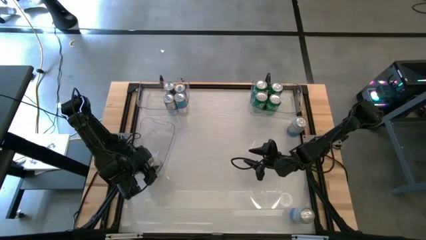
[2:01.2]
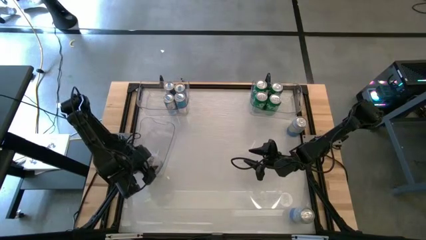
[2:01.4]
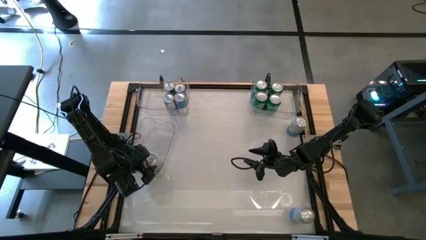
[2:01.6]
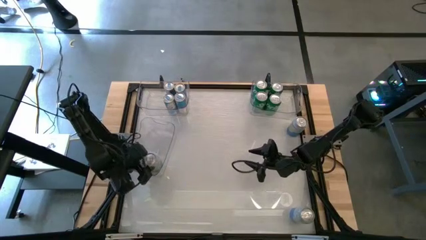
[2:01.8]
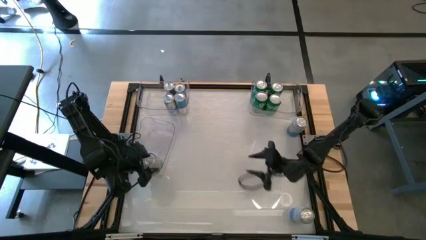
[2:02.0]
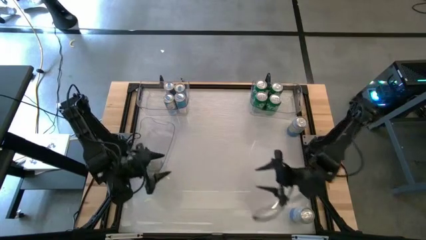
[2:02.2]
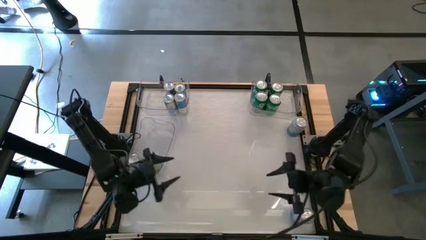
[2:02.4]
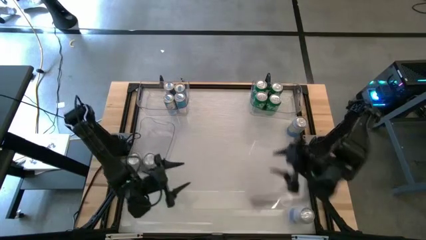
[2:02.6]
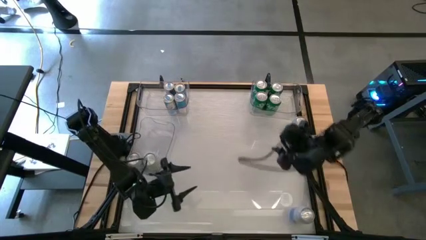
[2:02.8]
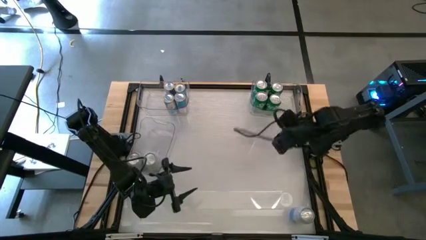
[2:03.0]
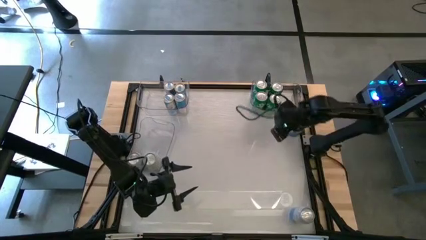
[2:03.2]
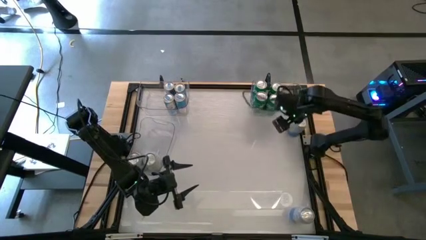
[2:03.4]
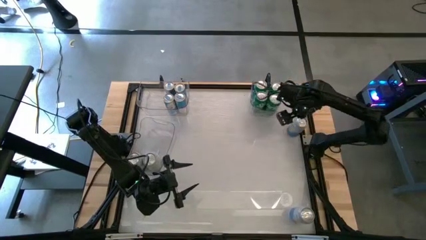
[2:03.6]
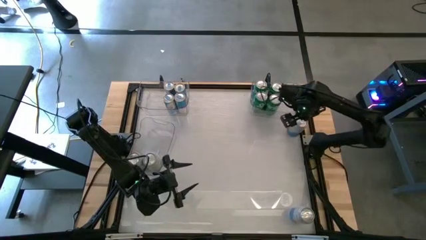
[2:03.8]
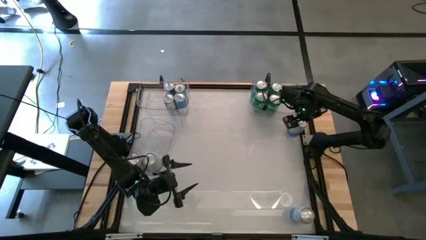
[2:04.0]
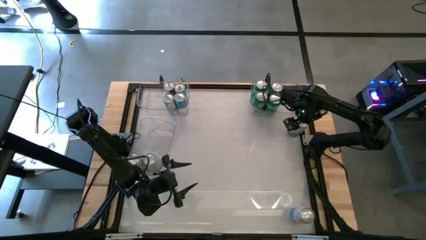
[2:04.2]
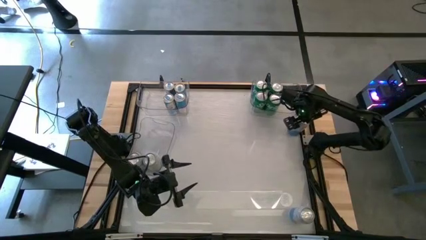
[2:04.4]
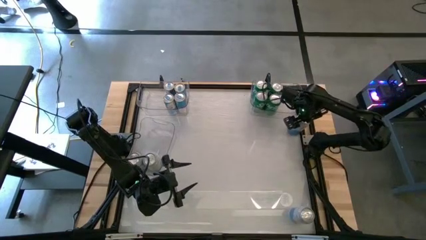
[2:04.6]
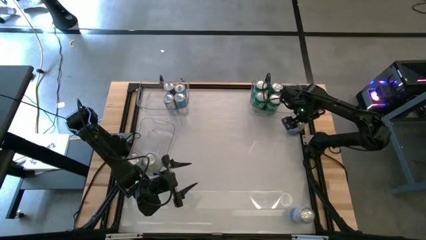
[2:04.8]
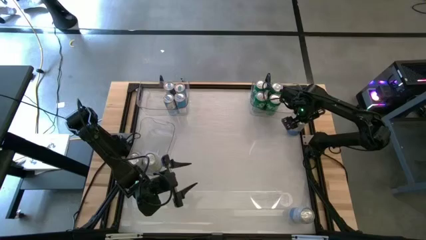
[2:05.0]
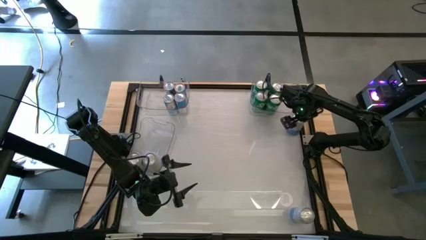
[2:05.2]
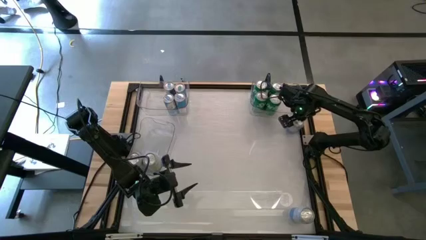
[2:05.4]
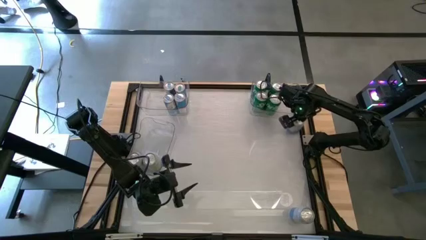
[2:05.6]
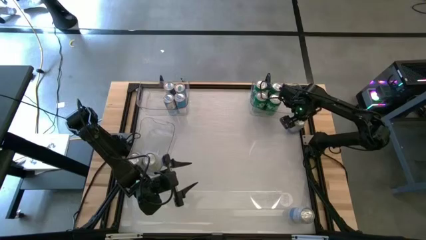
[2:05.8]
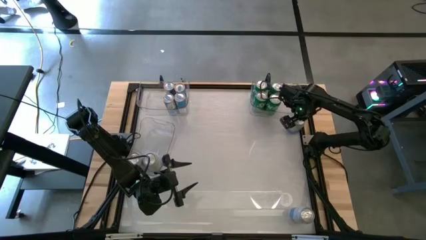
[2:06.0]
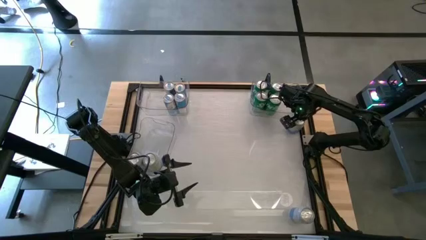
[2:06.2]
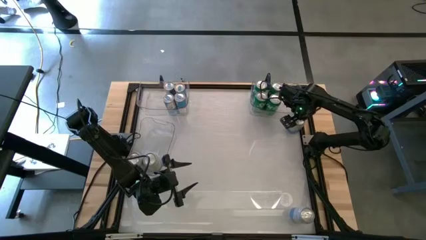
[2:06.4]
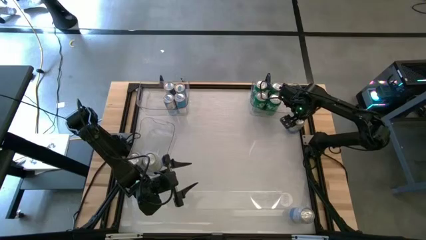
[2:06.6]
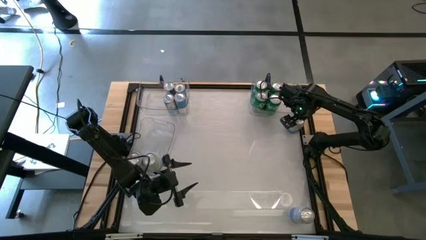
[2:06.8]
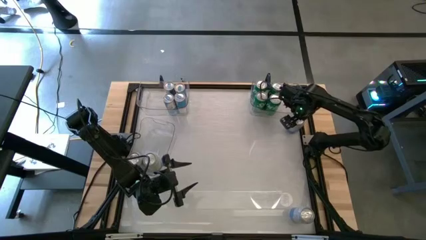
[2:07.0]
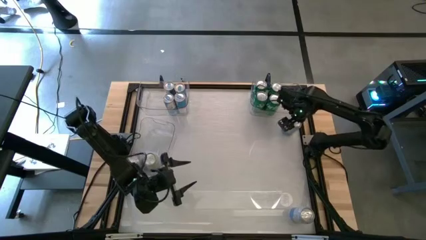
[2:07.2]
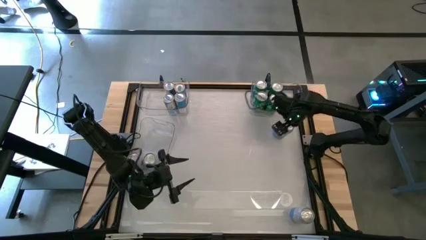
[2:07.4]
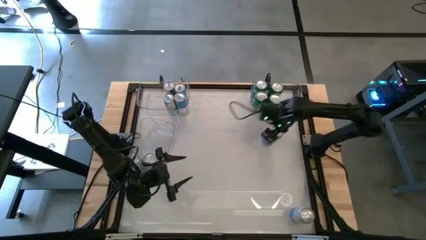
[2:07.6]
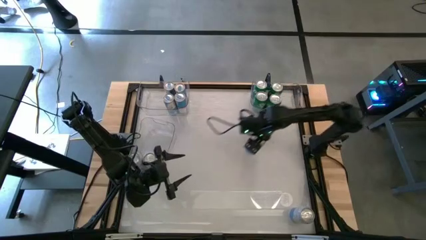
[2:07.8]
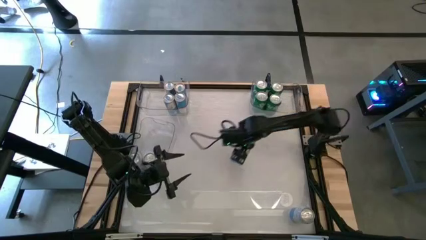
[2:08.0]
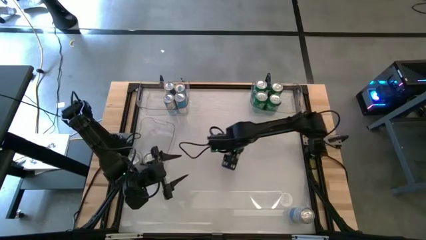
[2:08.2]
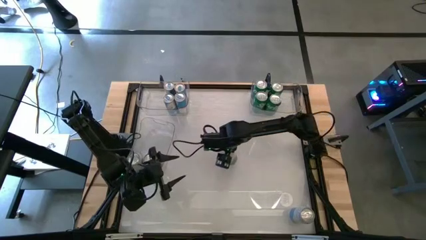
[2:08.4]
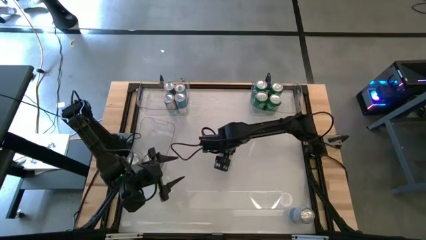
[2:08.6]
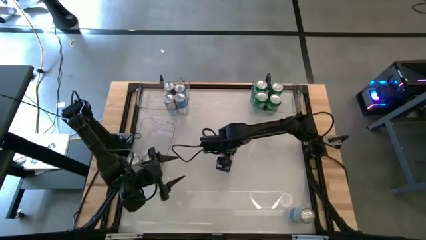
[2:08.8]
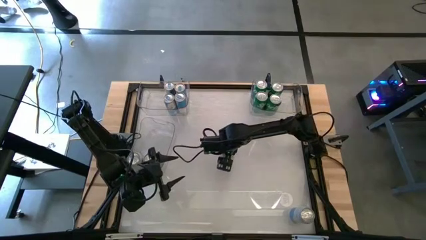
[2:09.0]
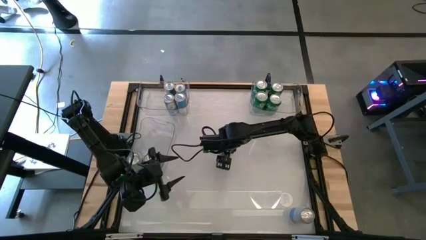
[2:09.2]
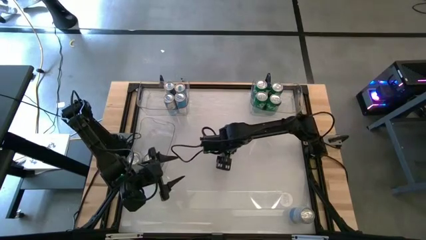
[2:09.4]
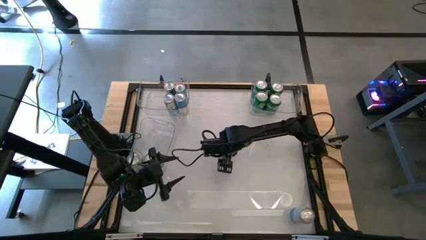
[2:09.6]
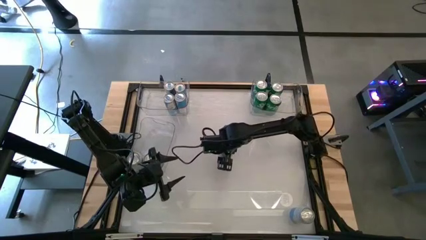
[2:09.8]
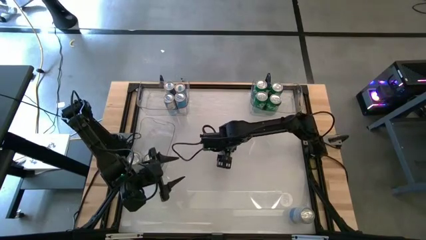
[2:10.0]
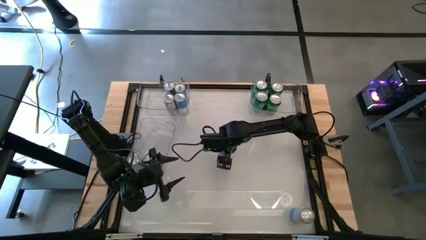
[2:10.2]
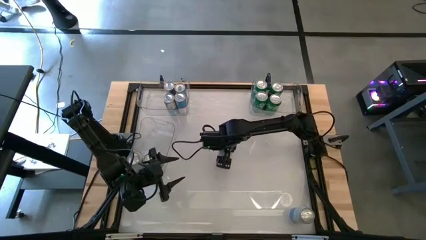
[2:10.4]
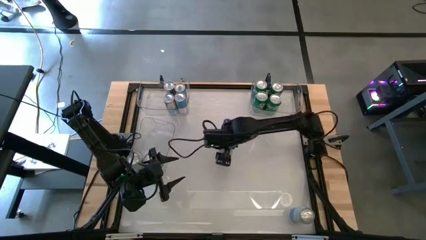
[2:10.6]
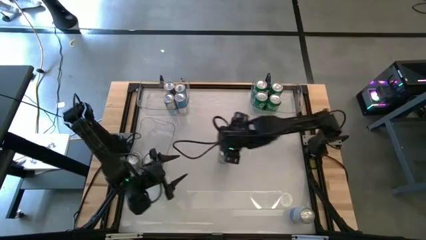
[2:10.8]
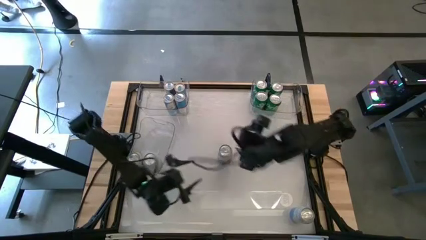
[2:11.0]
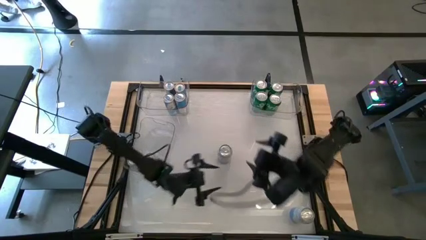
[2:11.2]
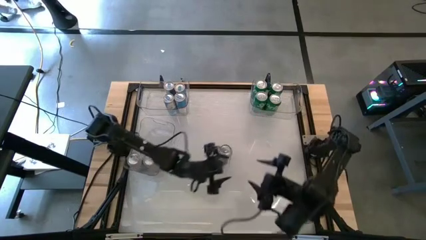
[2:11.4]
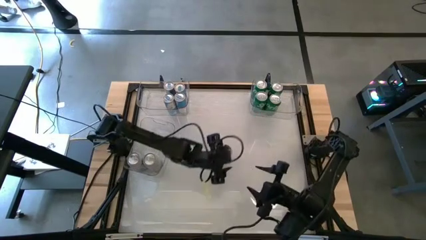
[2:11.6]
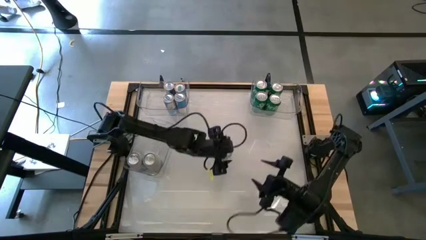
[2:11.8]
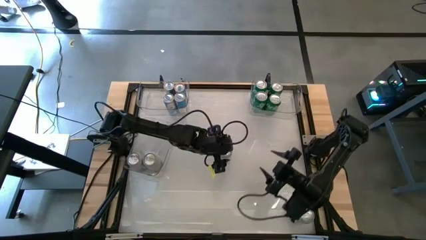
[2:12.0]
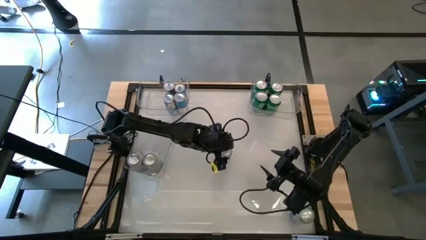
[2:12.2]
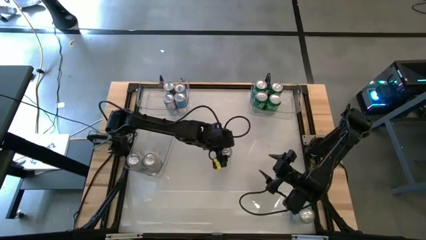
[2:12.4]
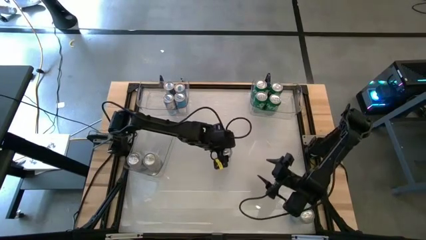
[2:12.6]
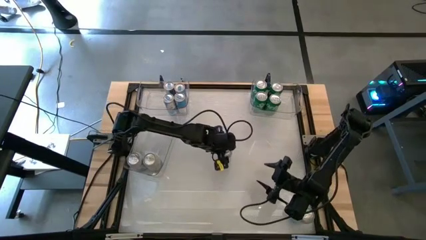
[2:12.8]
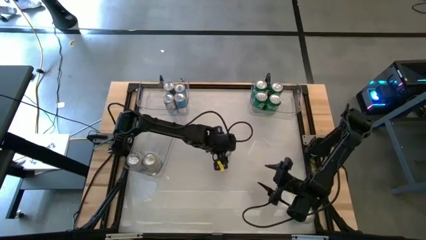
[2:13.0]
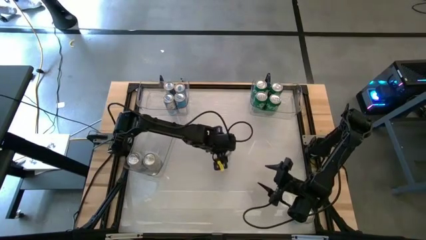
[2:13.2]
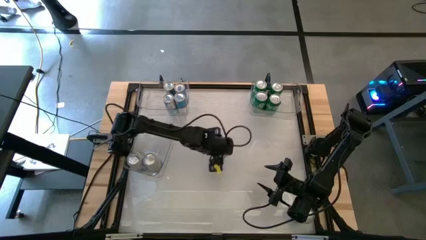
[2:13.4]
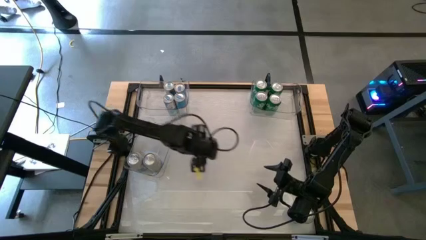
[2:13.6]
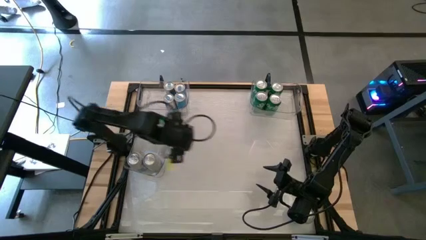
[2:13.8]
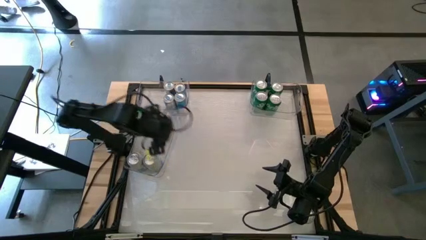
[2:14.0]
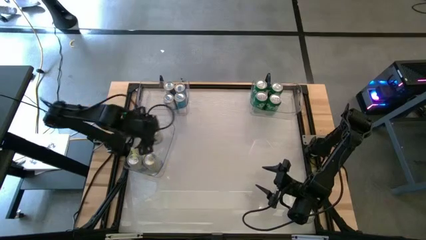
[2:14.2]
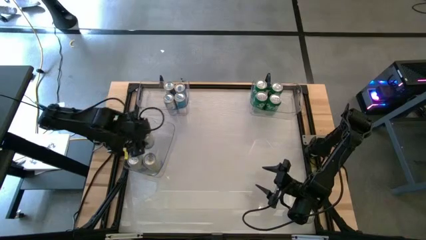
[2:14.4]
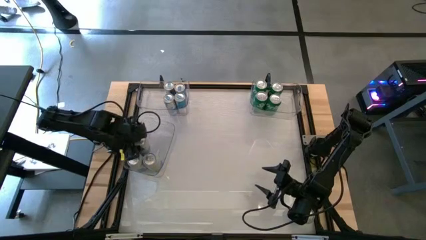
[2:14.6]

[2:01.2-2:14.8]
Task: Sort soda cans
Put the top blue-white soda can into the middle left transparent bin

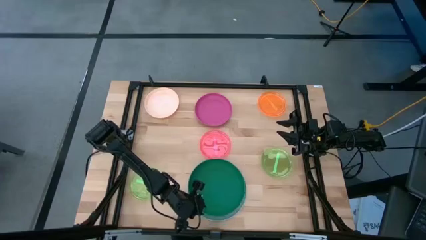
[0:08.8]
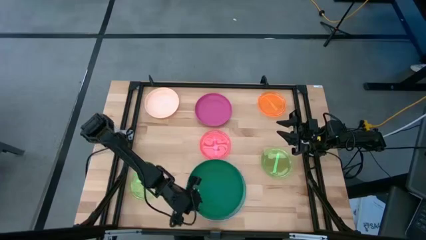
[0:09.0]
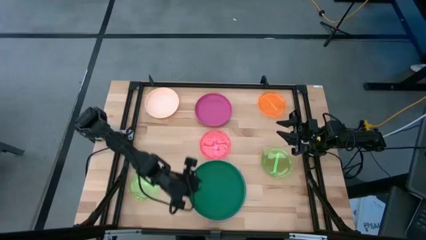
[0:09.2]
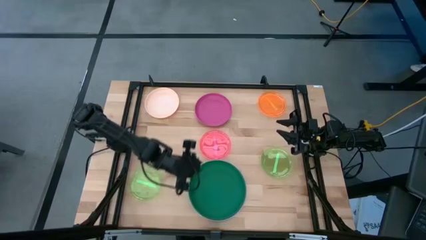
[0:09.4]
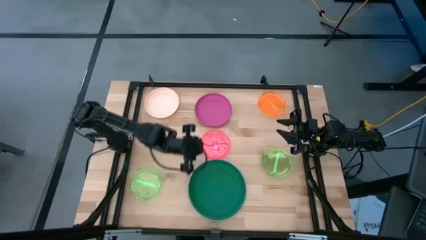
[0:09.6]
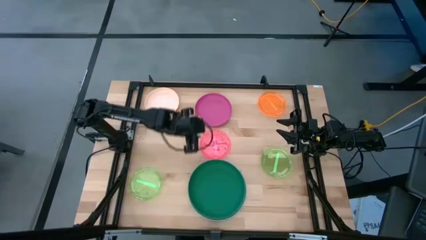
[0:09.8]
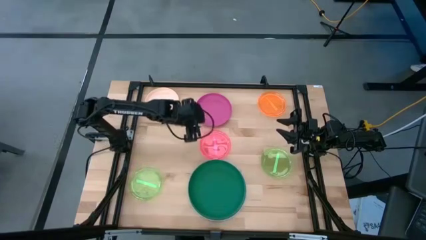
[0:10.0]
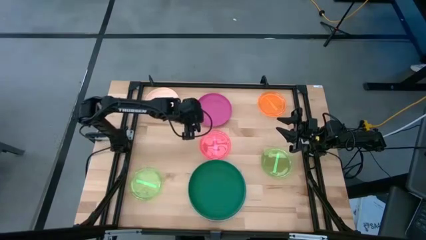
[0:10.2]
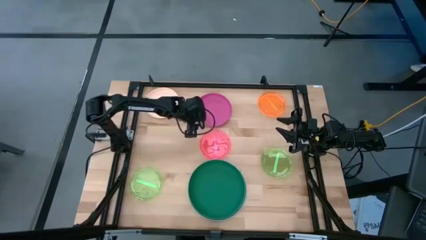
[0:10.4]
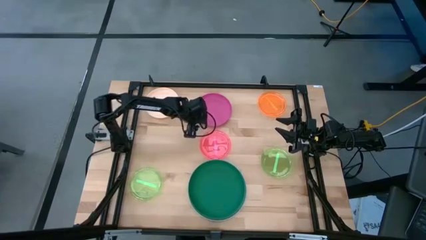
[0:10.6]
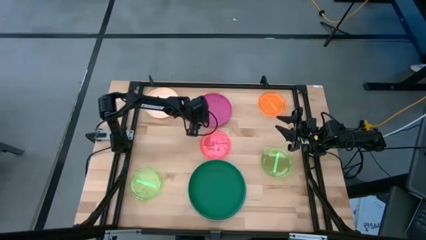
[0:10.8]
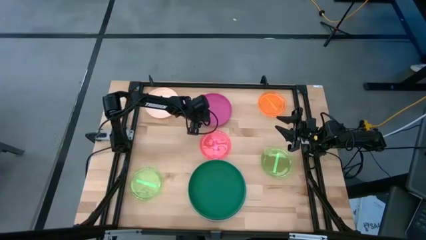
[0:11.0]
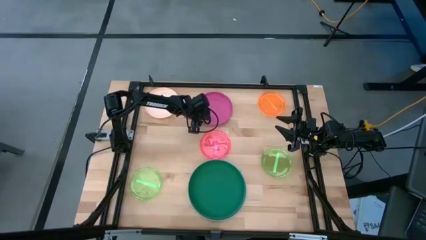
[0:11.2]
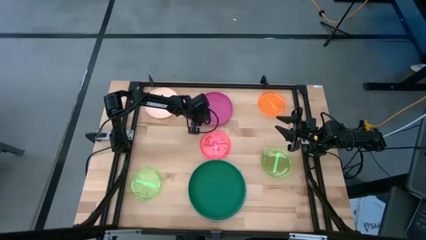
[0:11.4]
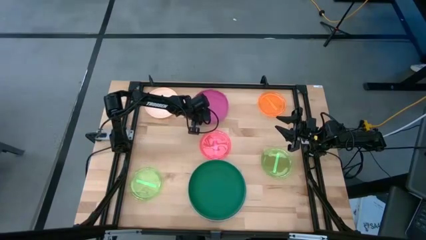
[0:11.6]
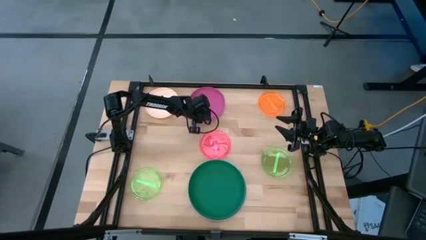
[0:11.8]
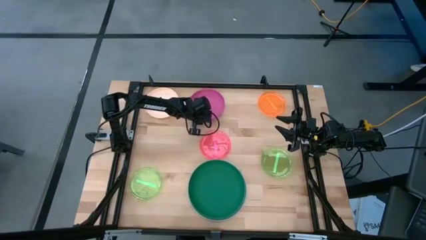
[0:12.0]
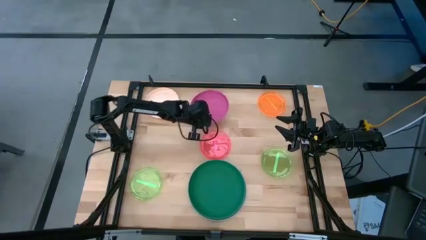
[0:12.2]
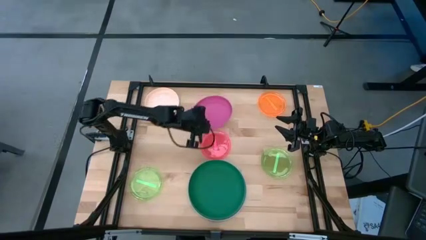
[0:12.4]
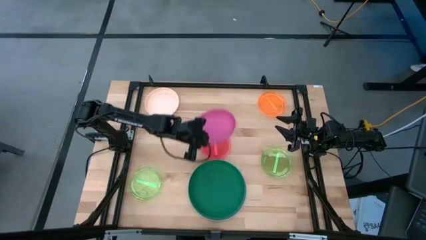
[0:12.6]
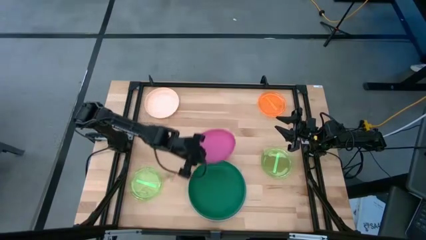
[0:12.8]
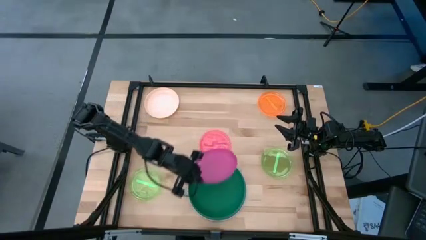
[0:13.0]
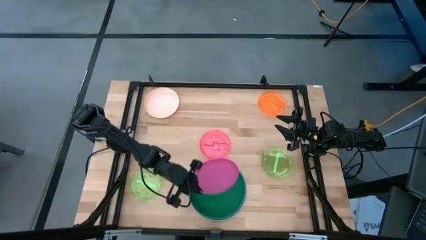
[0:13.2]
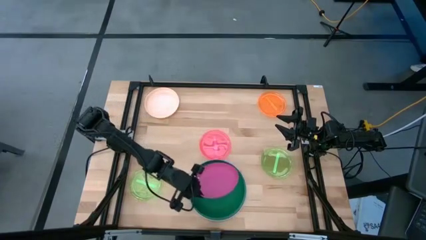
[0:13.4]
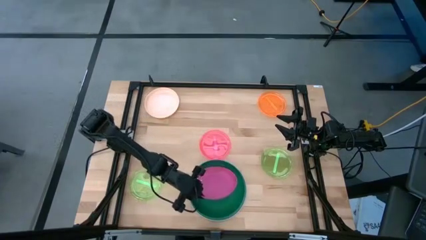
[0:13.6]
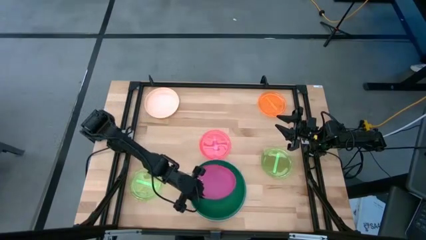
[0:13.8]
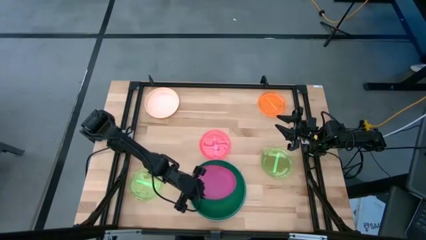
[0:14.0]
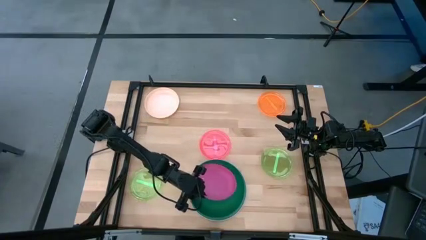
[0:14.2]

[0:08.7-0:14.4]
Task: Stack plastic plates
Stack the pink plate on the green plate
